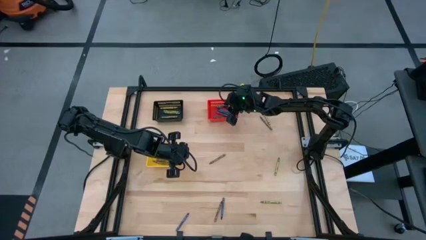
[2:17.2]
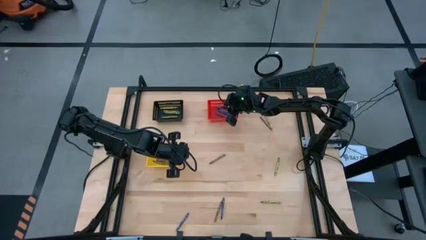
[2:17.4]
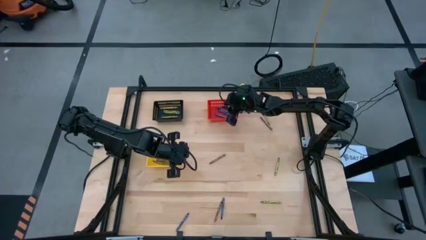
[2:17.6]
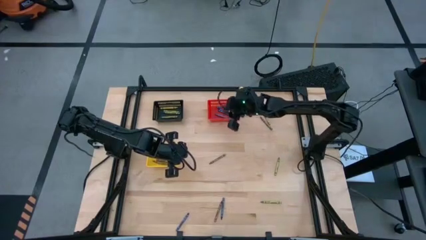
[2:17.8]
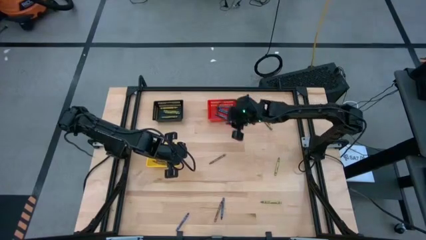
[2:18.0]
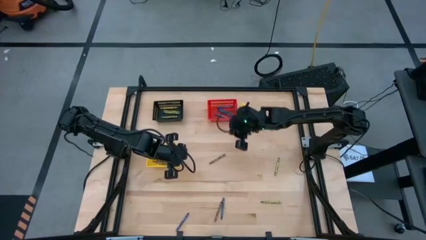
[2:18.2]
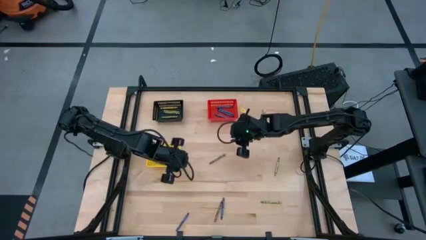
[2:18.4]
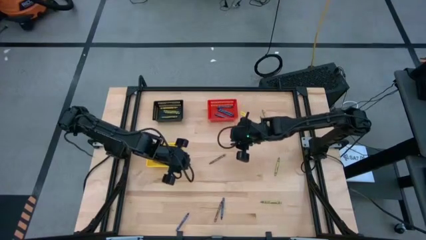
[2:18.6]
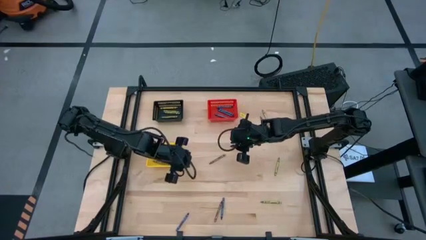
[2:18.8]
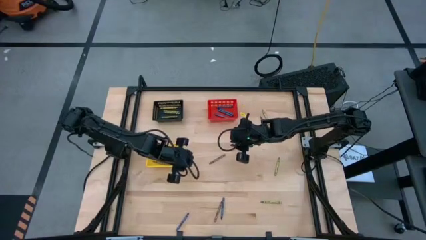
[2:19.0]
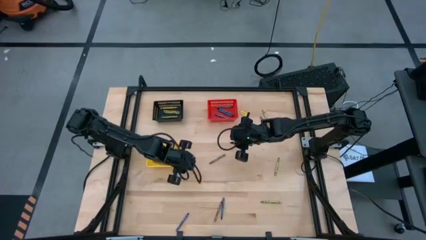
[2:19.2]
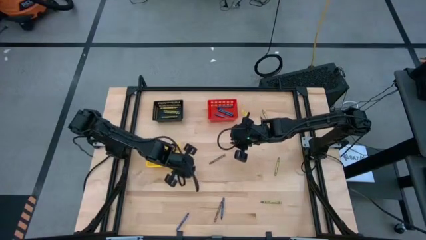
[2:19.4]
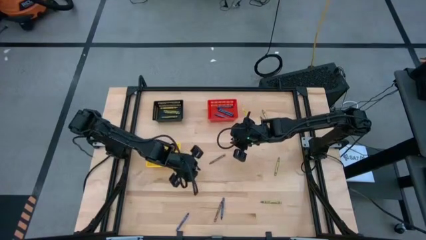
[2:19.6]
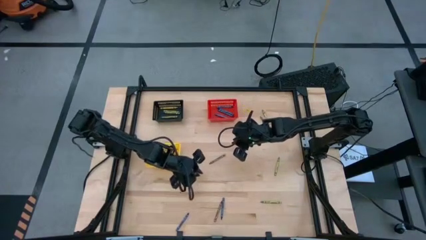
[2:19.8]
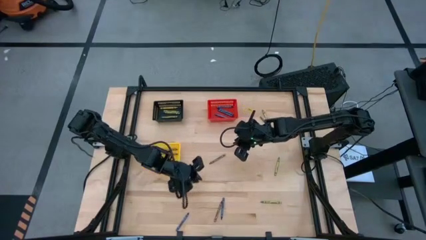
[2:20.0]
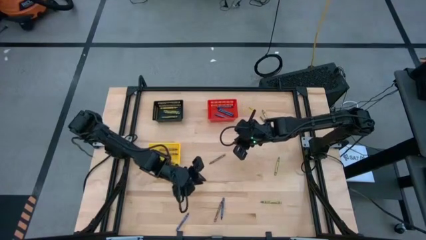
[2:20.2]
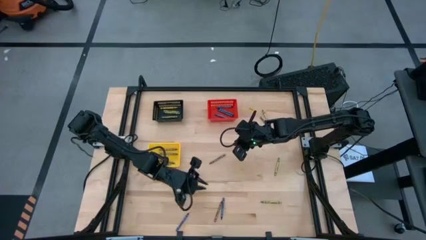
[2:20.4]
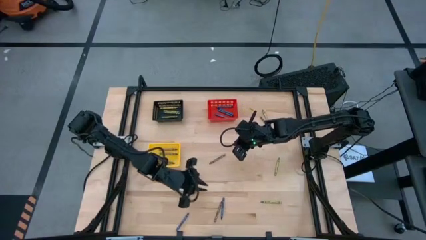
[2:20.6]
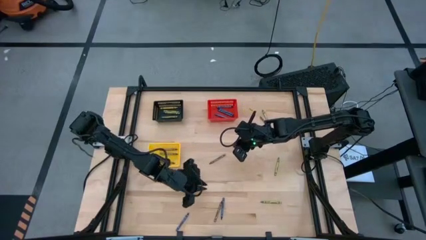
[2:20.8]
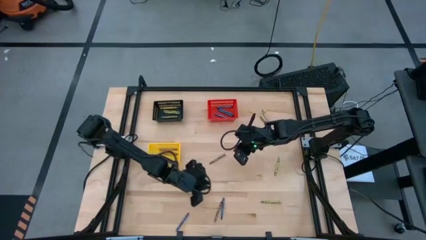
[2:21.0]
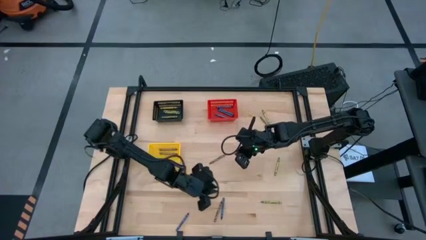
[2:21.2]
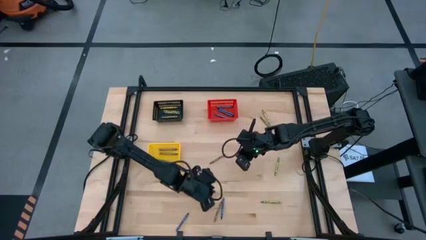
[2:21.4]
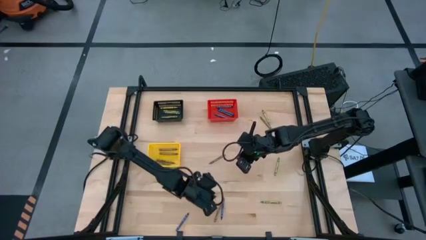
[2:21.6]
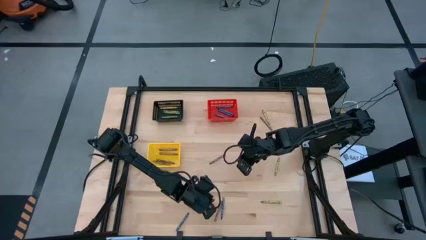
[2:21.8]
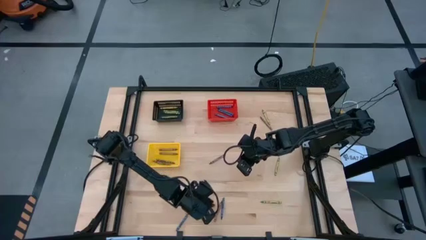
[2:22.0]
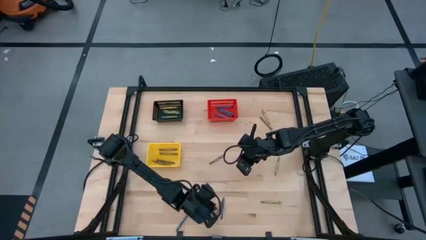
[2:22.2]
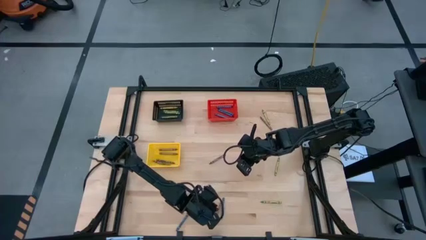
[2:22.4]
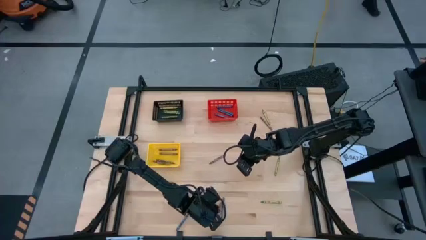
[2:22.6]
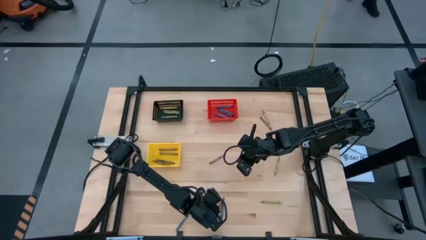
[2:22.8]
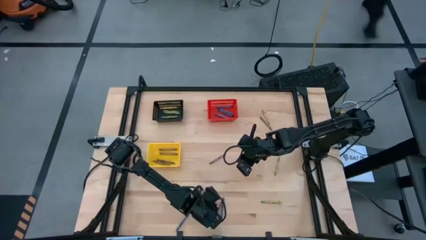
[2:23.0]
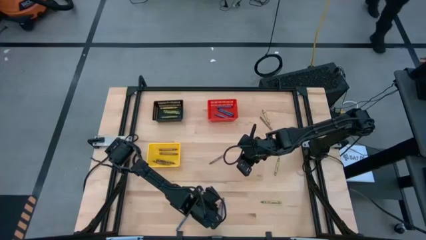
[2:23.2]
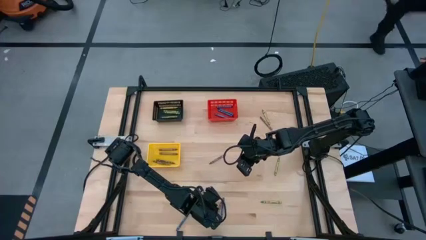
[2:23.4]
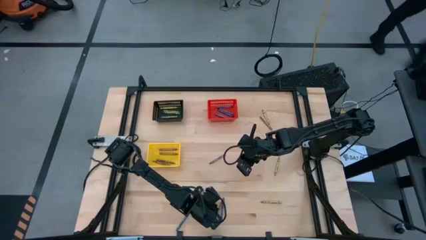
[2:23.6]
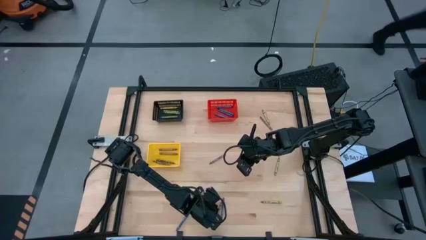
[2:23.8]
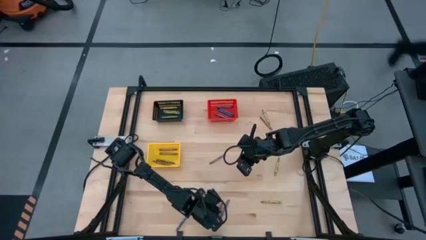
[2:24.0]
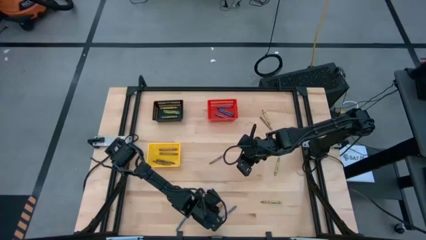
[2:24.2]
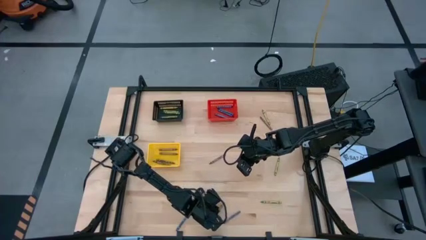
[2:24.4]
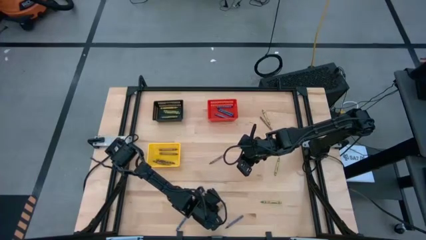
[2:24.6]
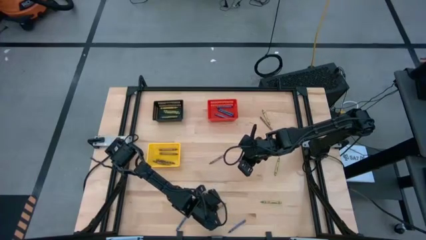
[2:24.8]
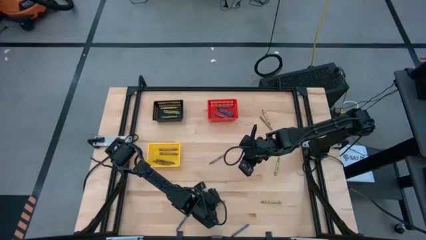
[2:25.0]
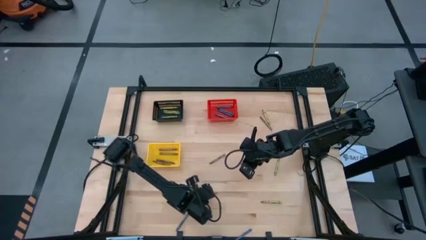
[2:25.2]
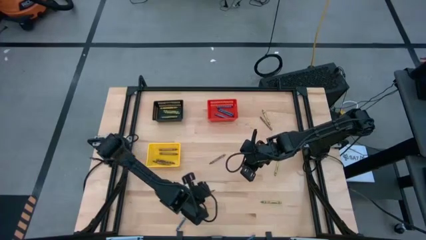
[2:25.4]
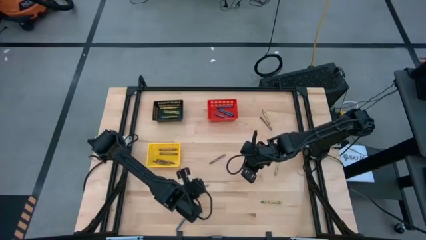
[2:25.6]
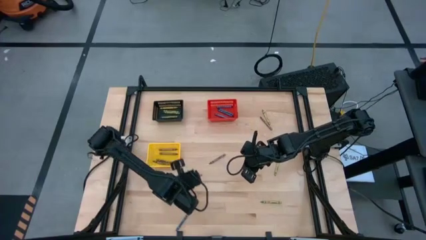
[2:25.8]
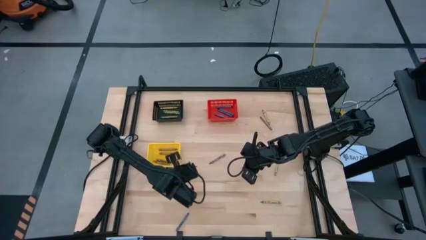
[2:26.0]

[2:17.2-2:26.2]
Task: Sort crayons
Put the brown crayon into the yellow basket

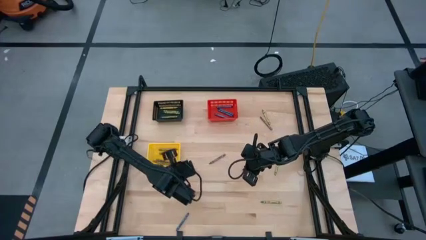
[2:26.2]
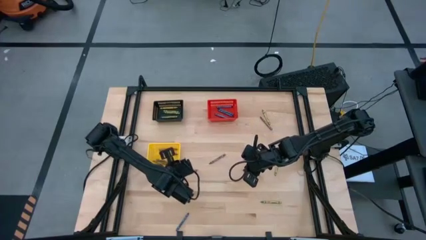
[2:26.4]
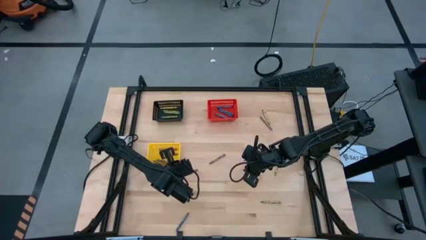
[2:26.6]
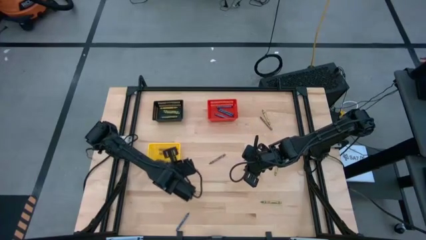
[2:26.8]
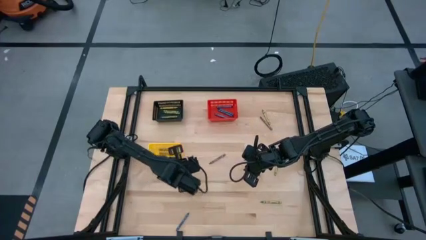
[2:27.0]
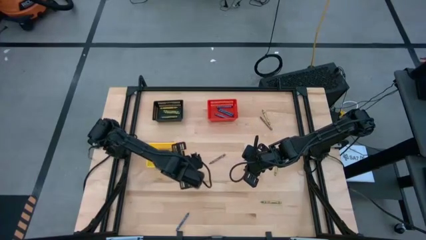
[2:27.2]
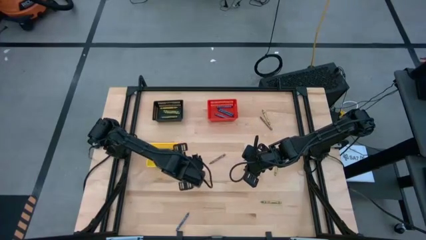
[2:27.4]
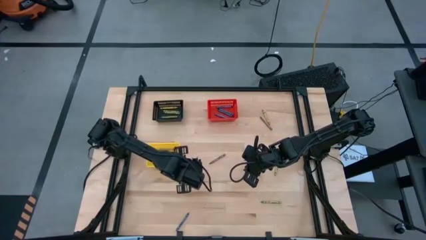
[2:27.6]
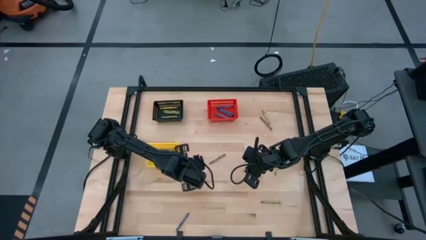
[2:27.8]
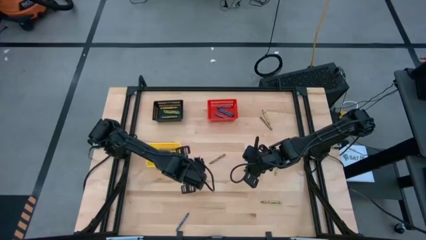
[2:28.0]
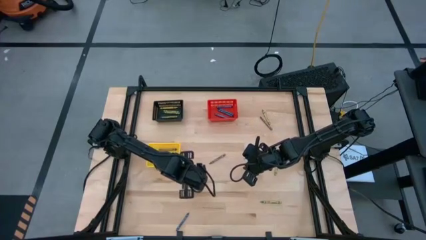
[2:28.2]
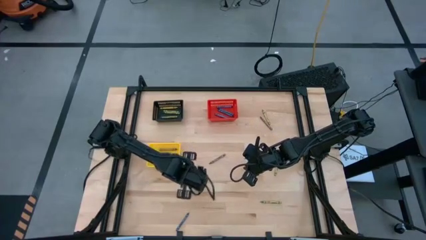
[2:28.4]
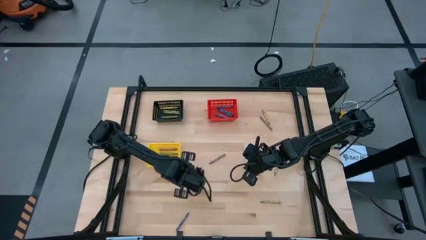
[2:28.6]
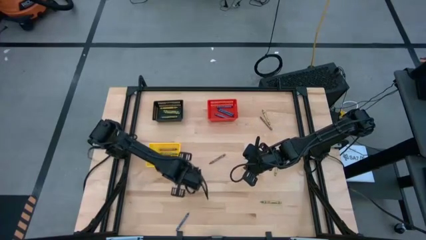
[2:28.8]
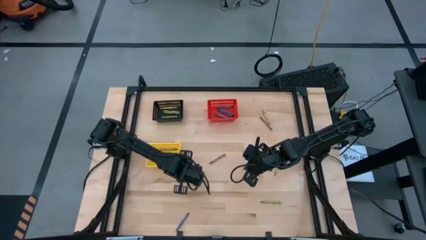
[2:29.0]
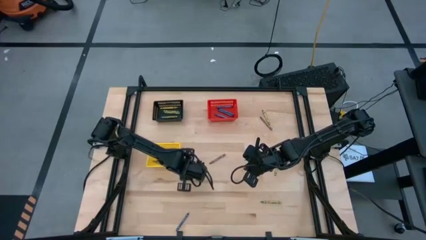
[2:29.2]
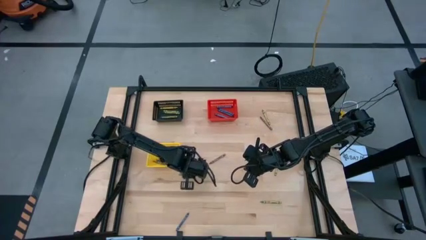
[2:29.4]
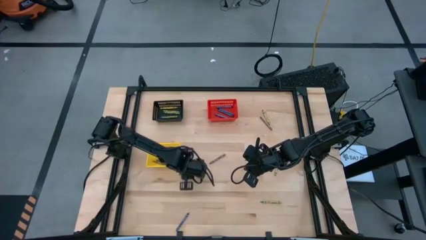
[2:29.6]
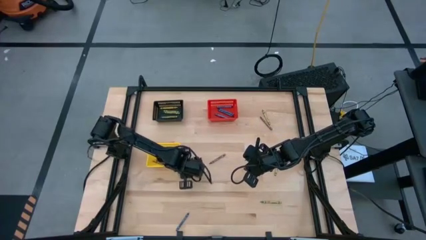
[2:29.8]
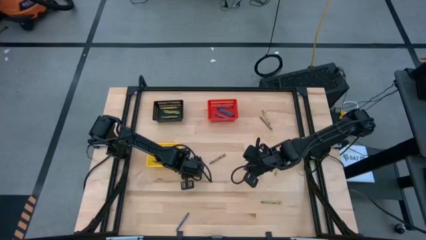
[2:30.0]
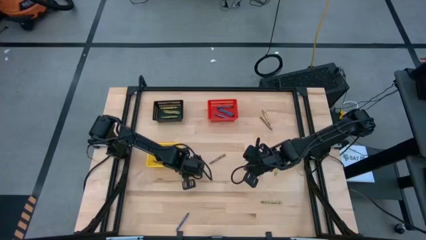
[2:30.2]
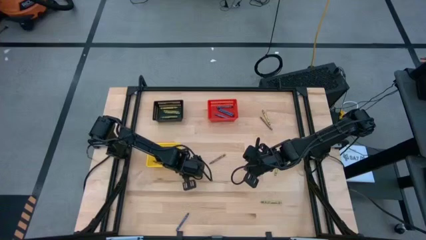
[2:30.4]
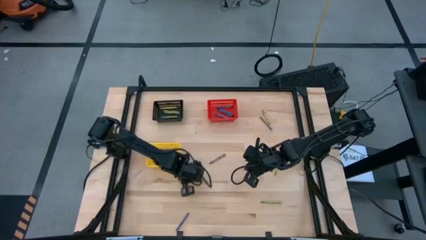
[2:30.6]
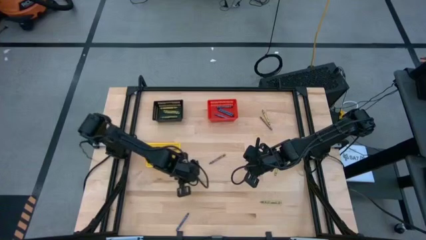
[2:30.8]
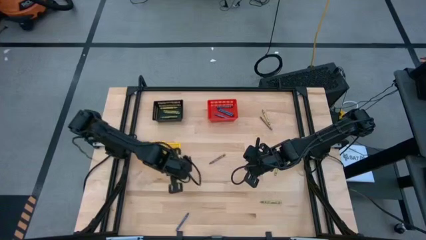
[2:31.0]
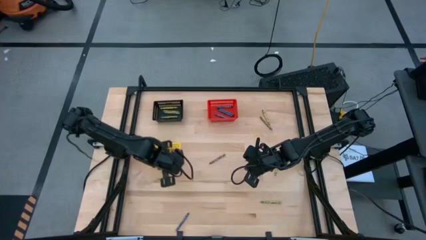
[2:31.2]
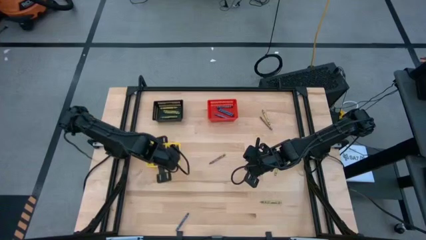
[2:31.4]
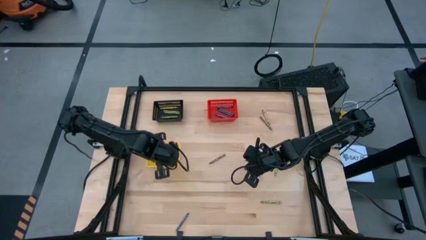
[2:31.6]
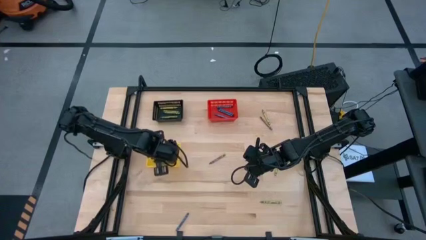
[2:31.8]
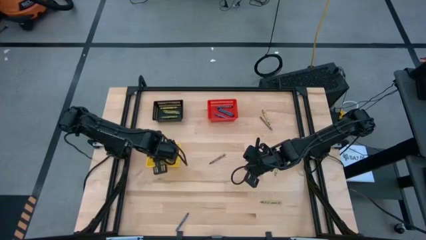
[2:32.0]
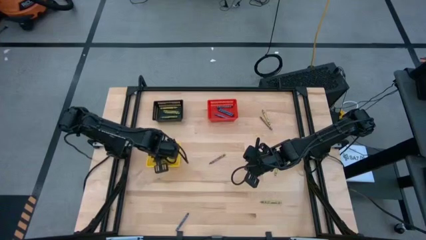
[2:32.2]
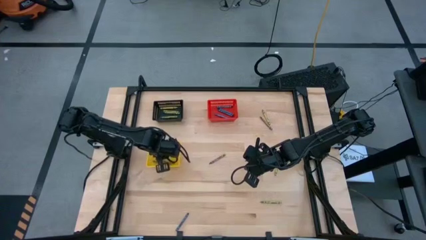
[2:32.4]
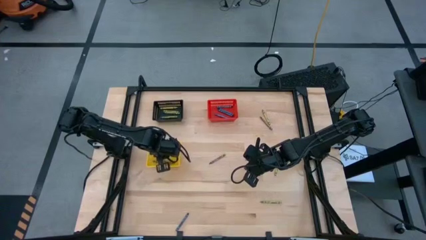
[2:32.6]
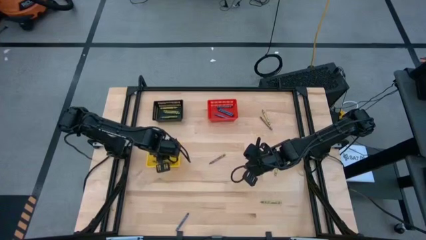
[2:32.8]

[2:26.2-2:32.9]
Put the brown crayon into the yellow basket
